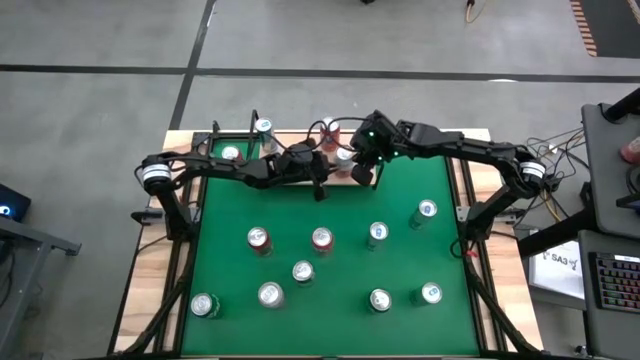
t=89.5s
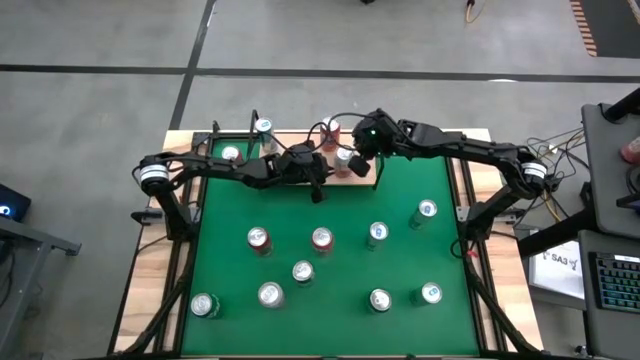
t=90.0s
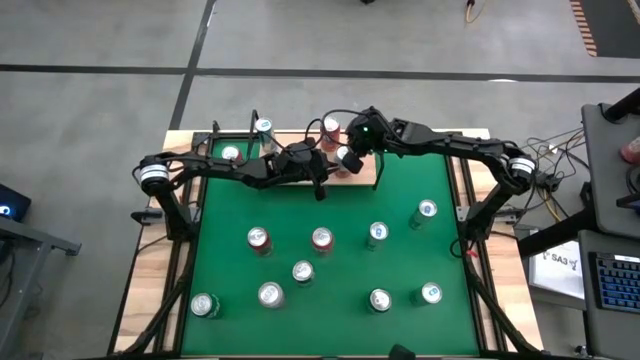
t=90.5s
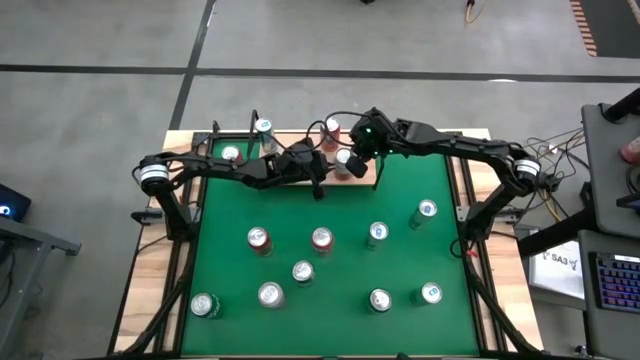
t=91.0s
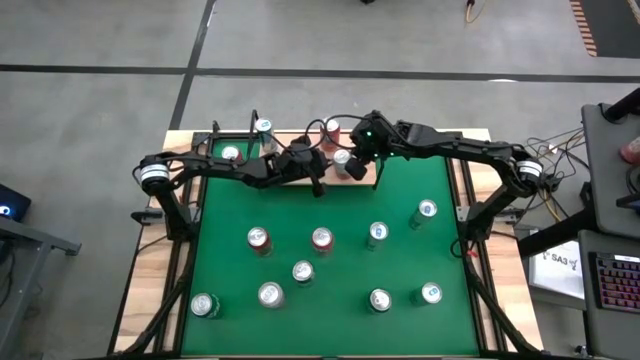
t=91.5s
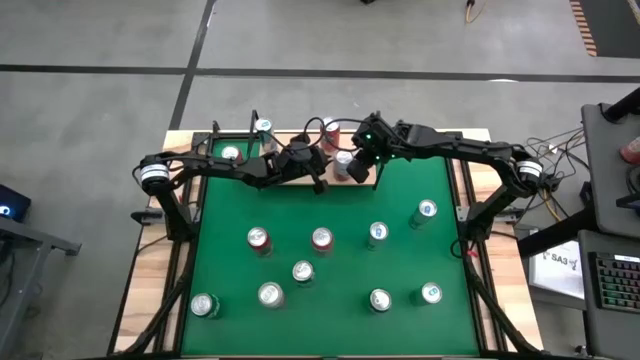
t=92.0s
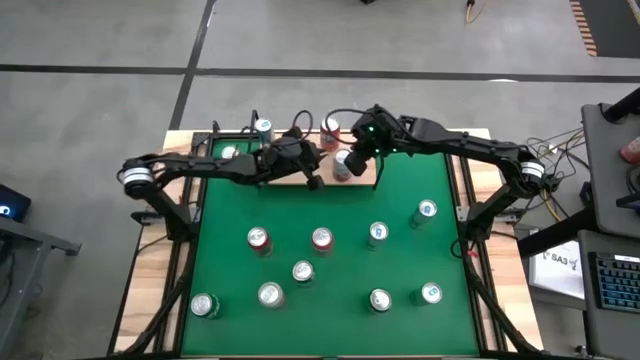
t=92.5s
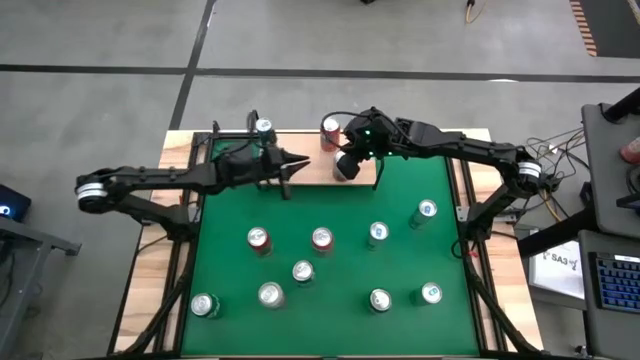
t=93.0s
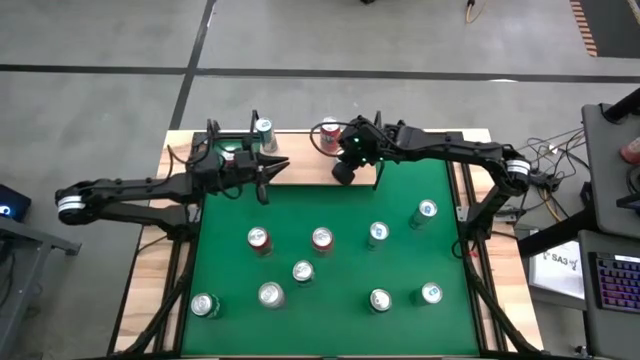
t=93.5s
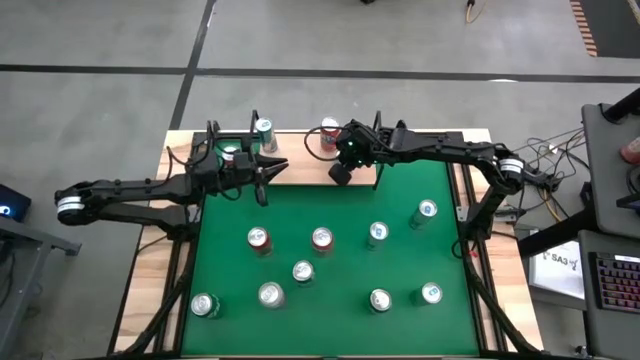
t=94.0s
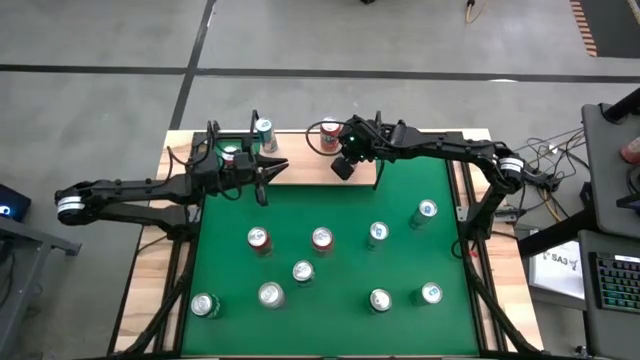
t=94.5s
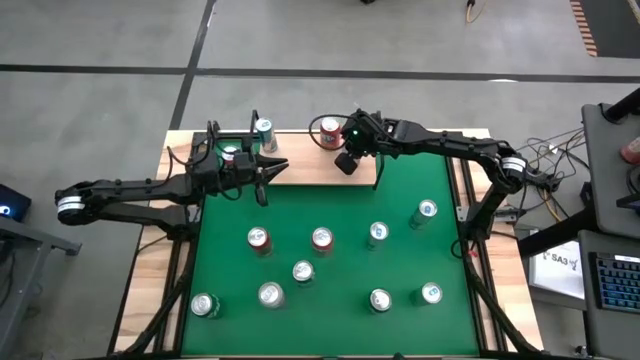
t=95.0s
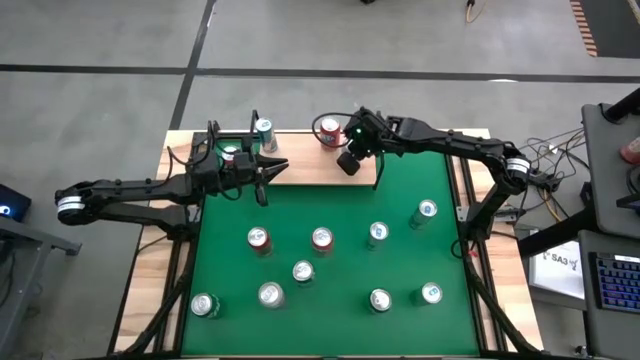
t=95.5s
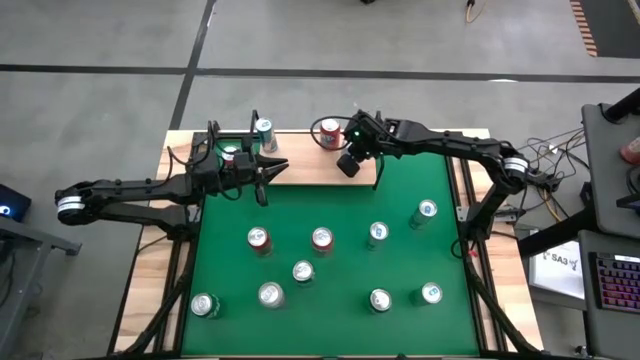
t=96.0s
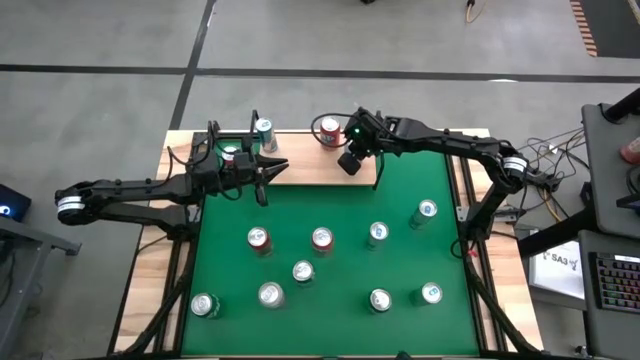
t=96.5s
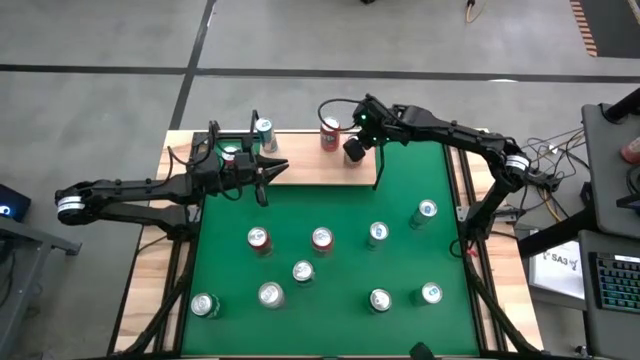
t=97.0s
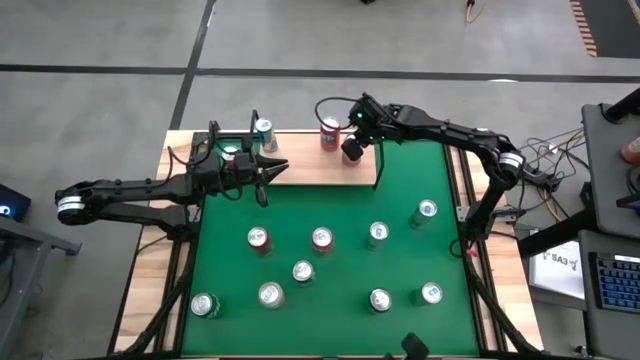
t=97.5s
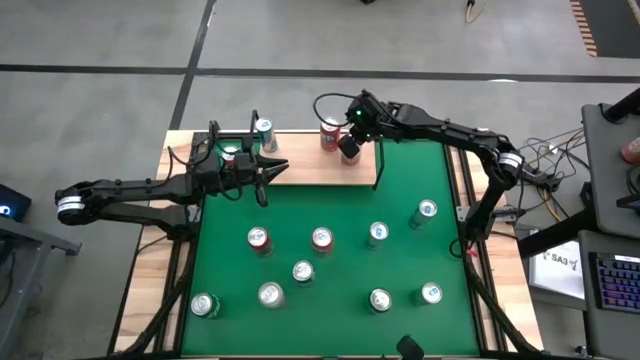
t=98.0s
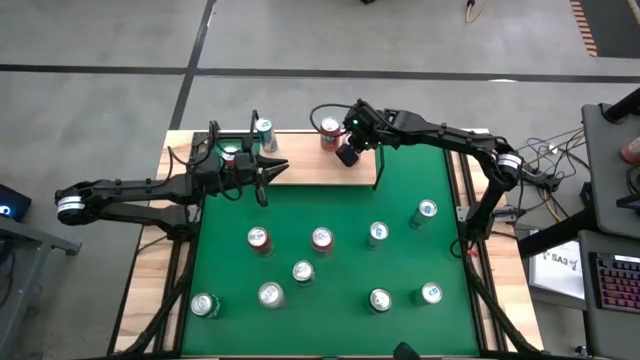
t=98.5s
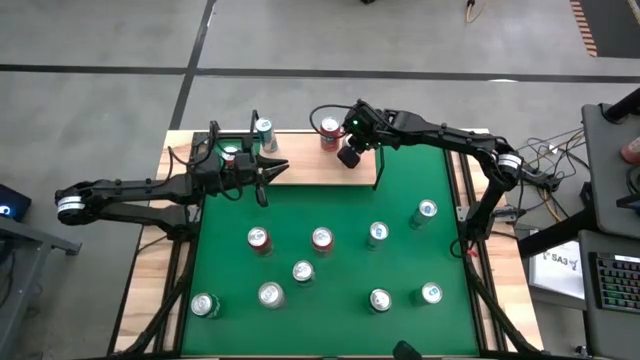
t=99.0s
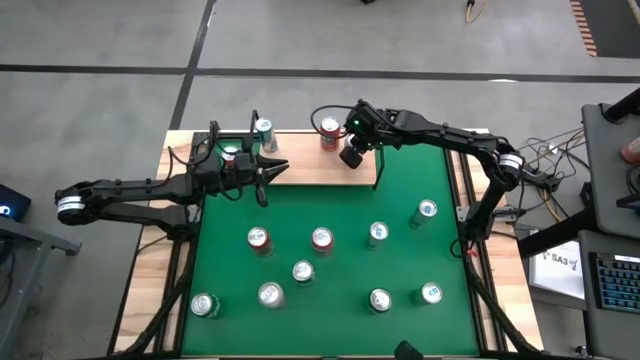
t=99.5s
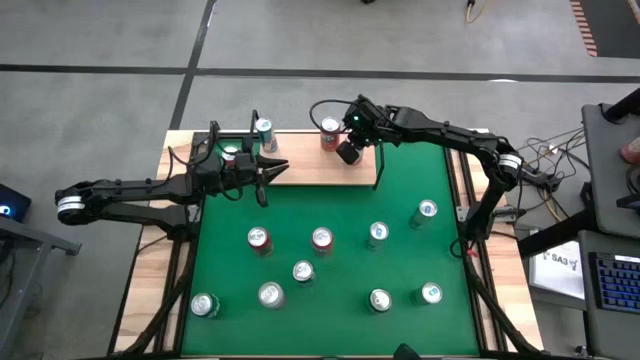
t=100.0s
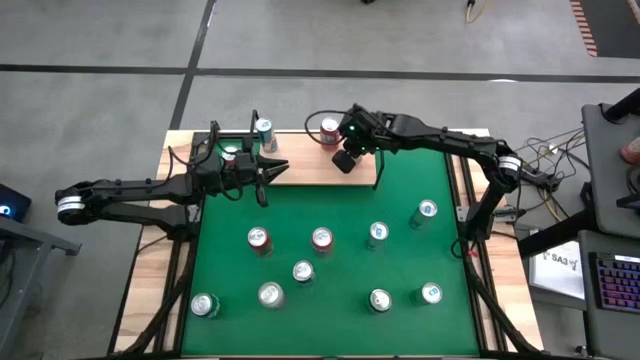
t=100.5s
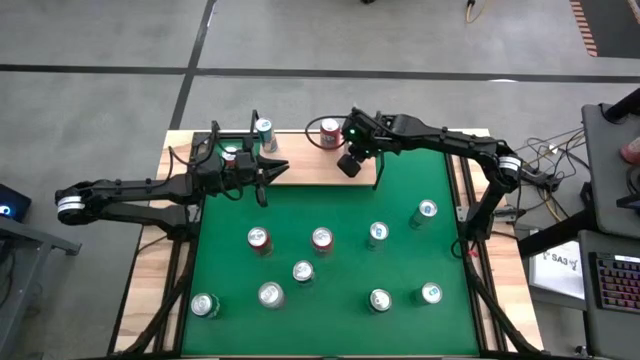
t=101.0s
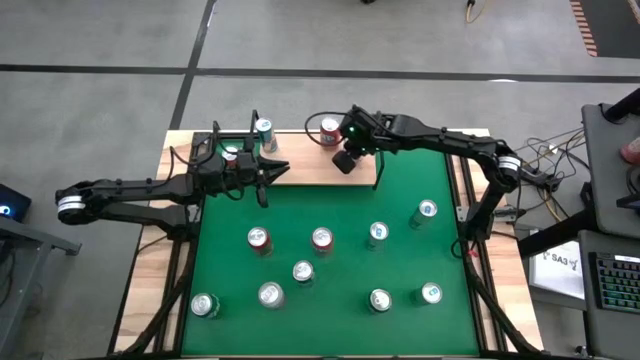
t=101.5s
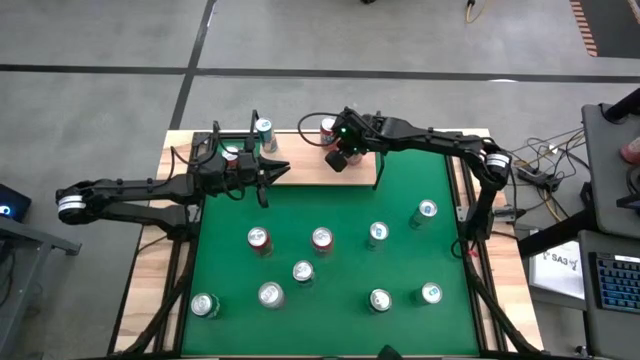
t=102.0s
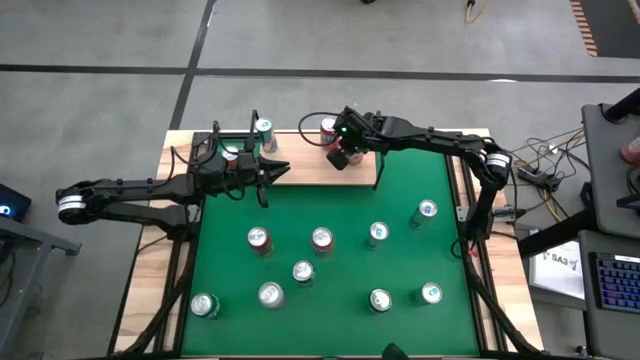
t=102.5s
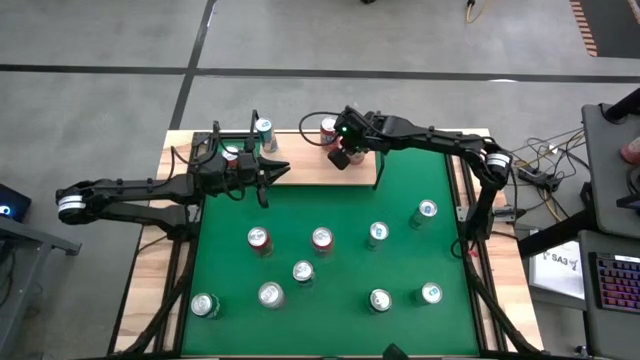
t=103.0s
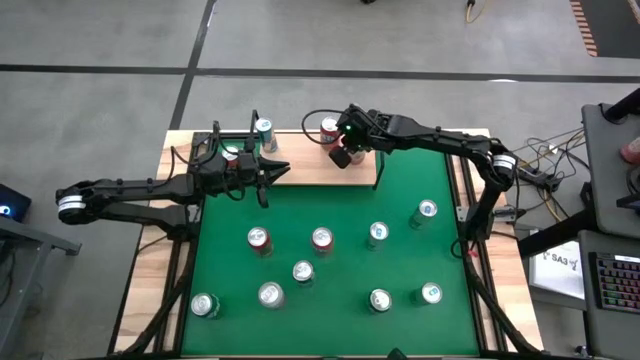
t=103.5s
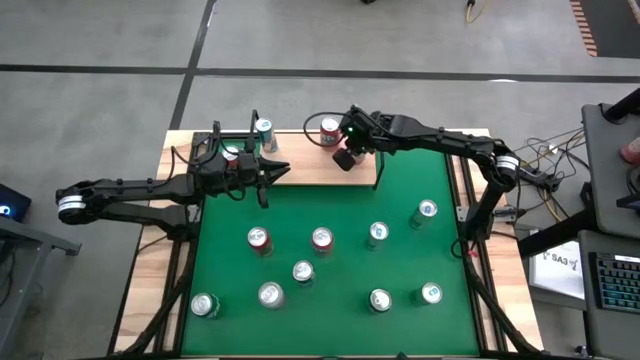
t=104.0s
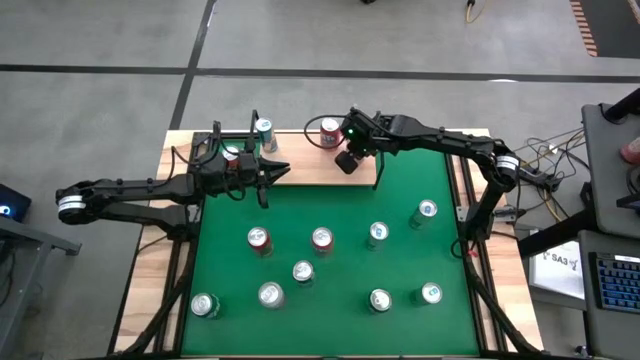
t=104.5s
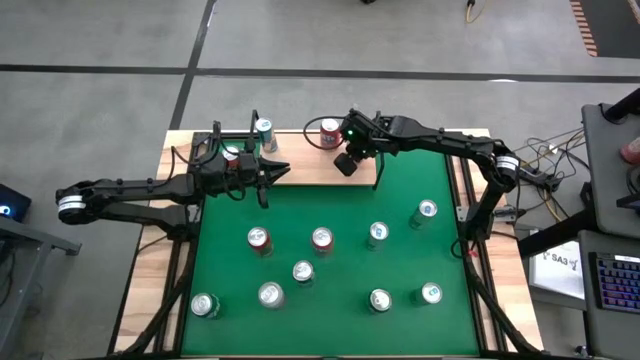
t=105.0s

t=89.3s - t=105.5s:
Task: Pick and place cans onto a shelf
Put the right pink white soda can on the shelf

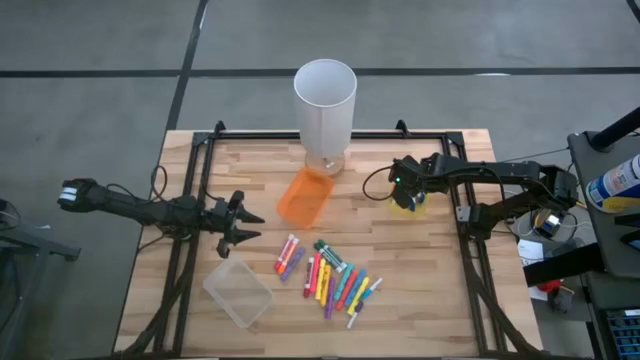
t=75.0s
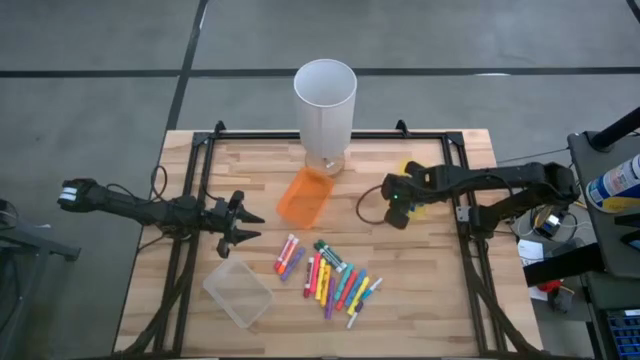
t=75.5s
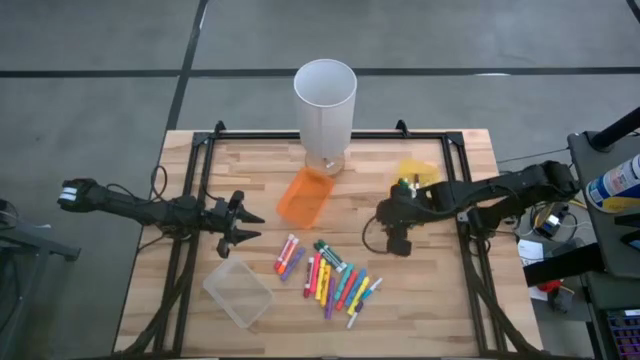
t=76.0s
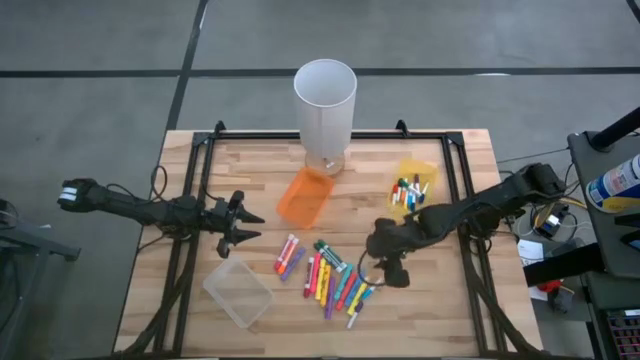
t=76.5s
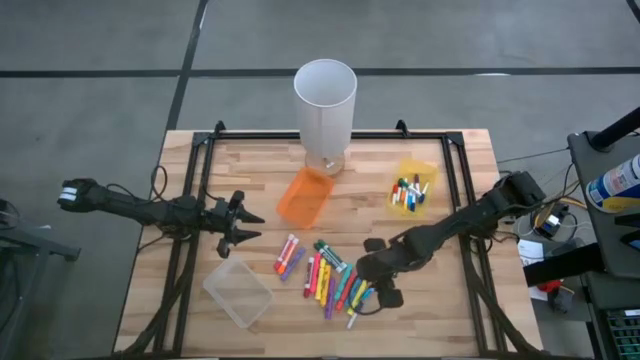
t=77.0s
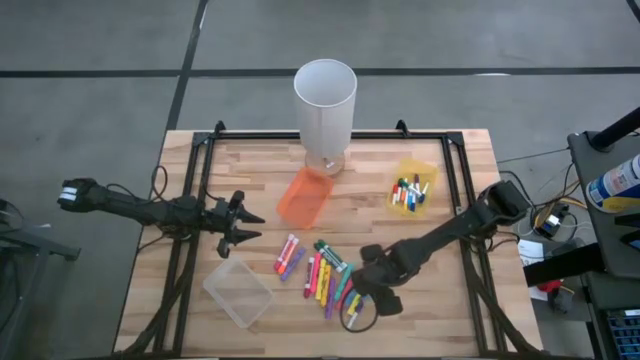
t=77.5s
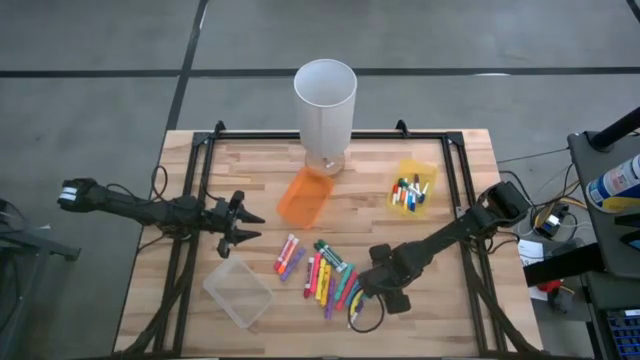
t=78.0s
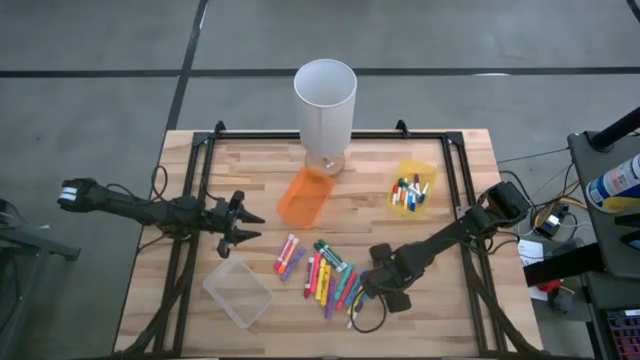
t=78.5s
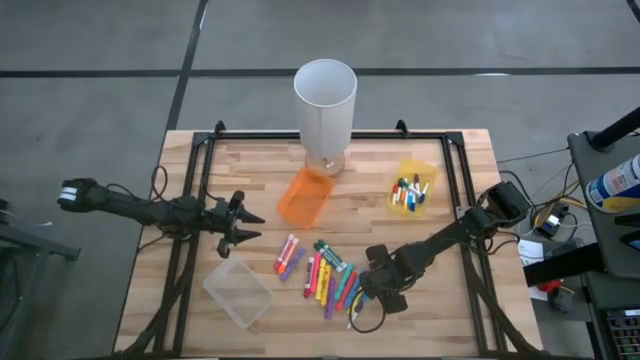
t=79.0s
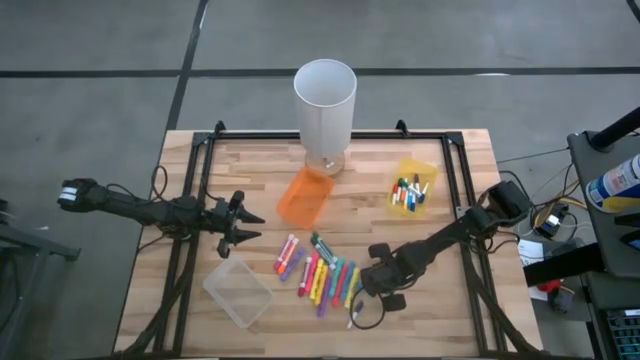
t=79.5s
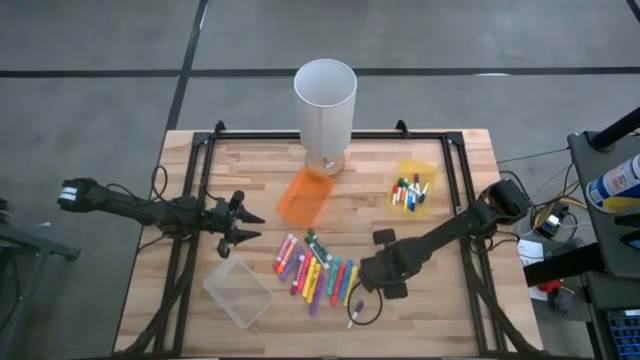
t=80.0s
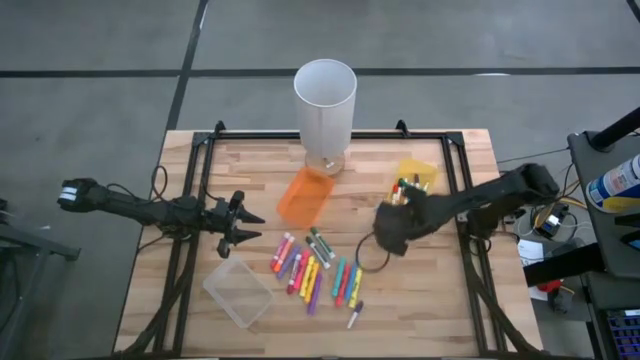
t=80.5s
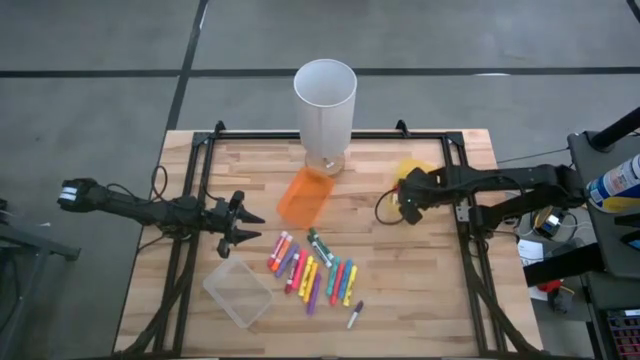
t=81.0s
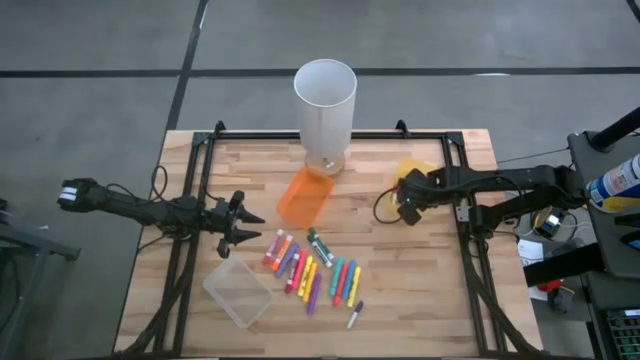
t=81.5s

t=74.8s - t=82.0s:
Task: Pick & Place Markers
Put the small light blue marker pen into the yellow bin
